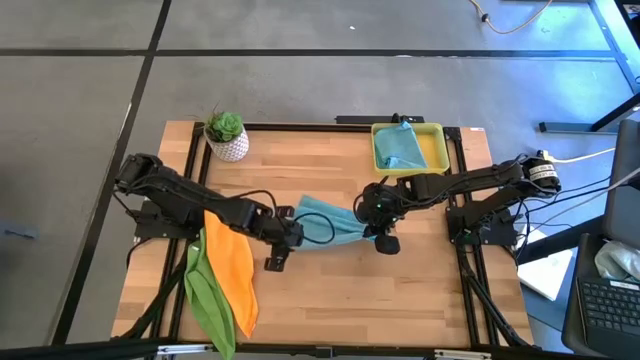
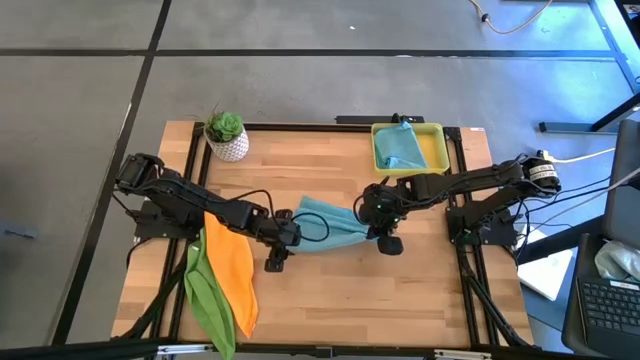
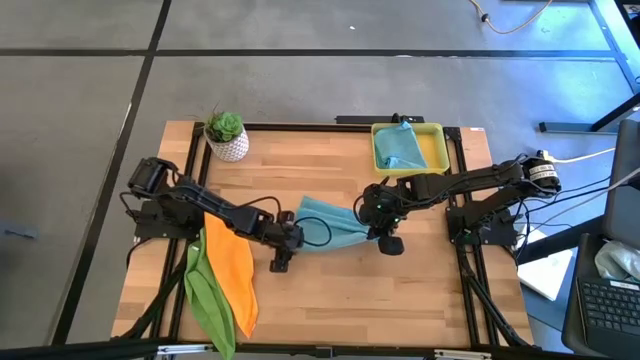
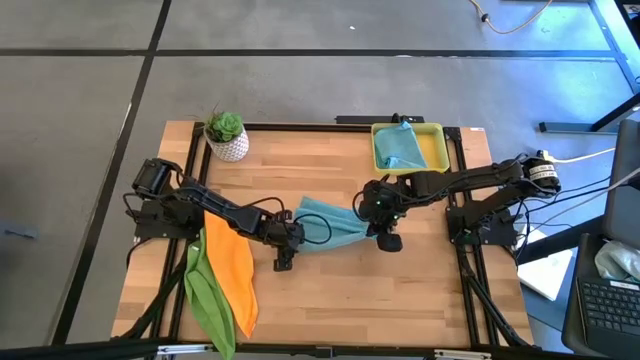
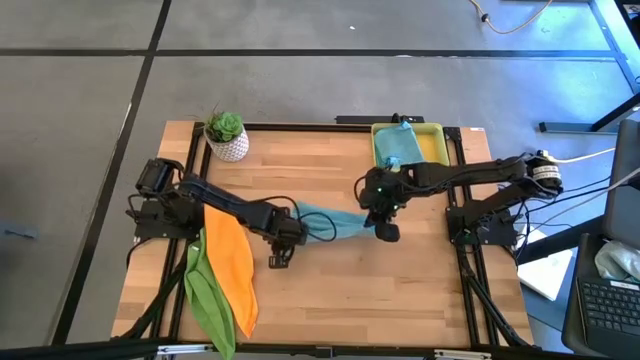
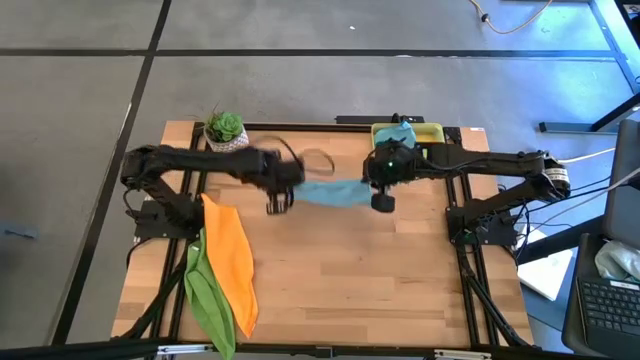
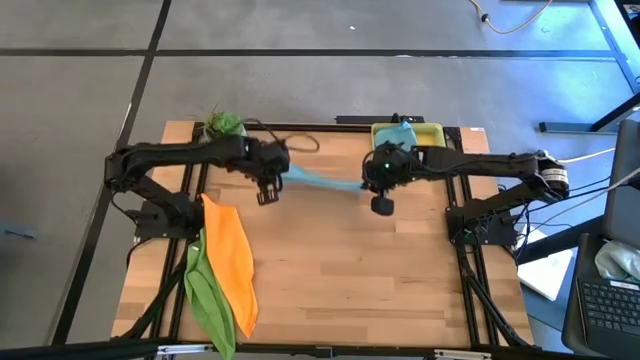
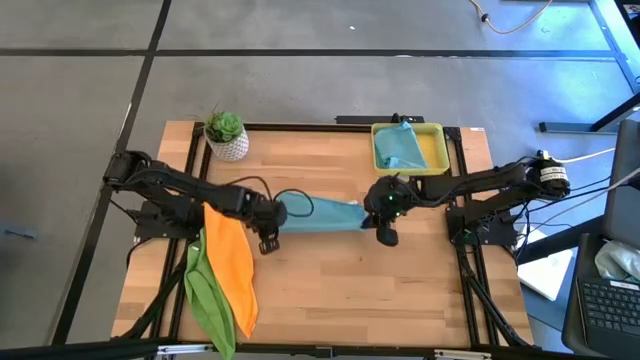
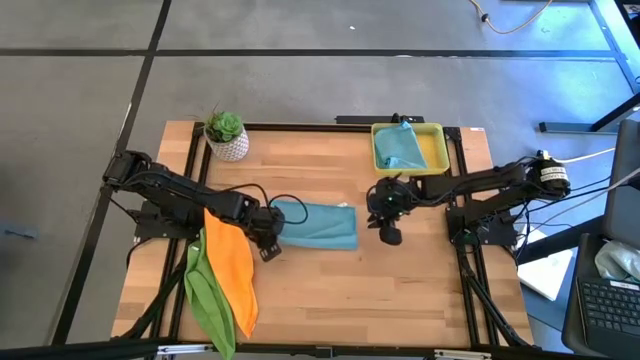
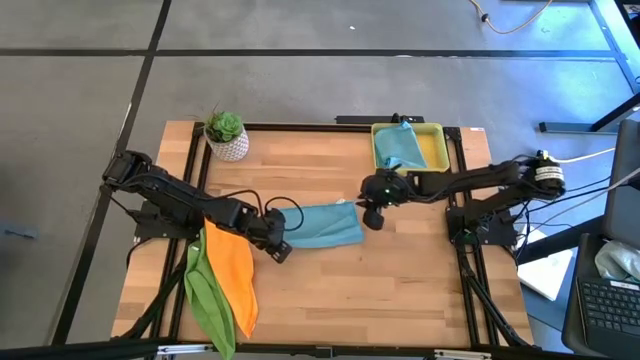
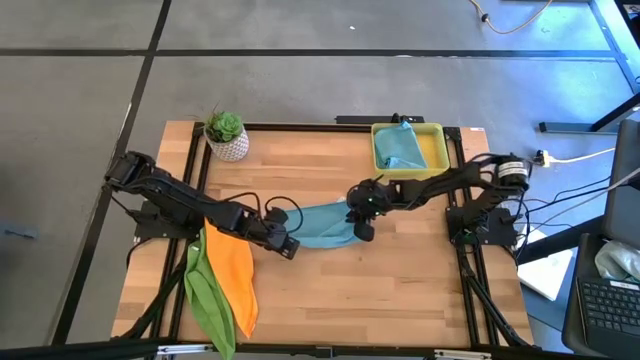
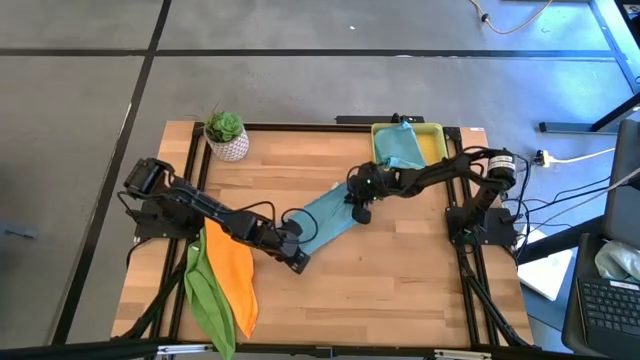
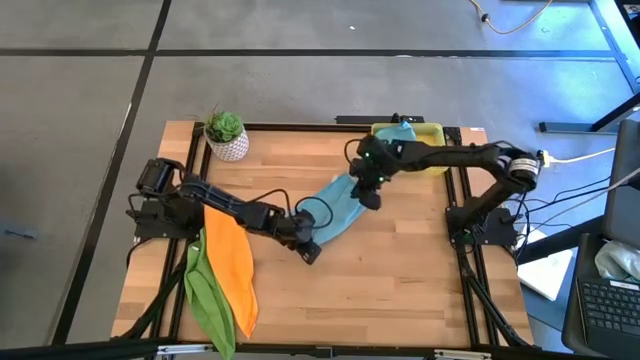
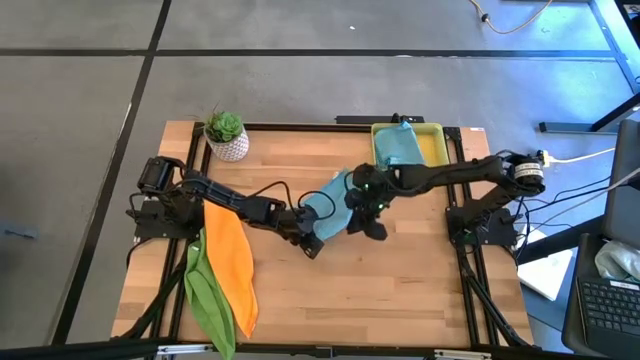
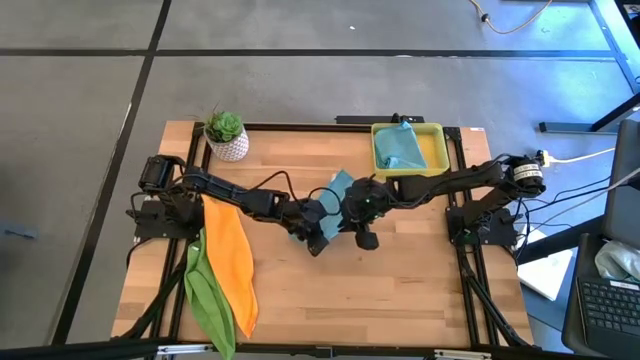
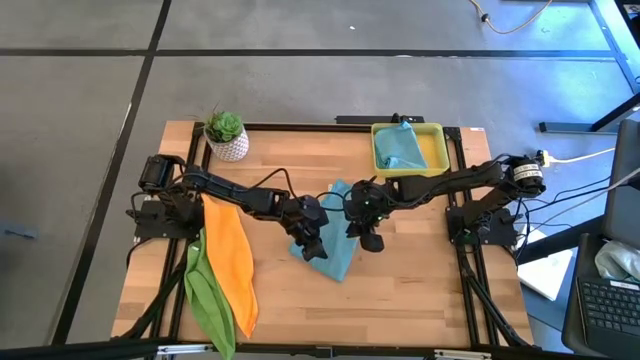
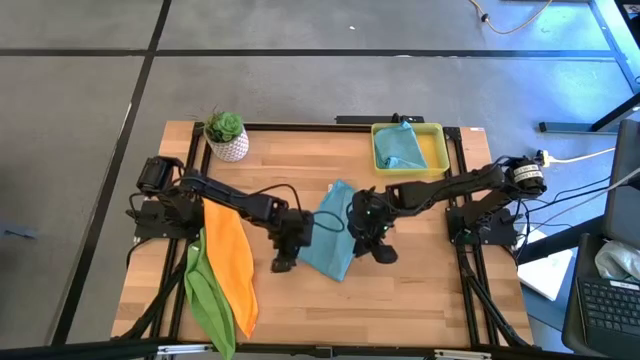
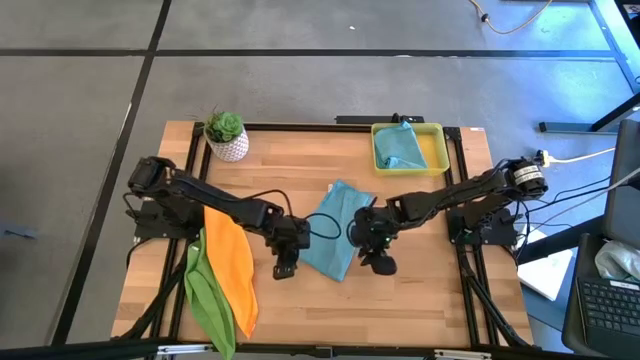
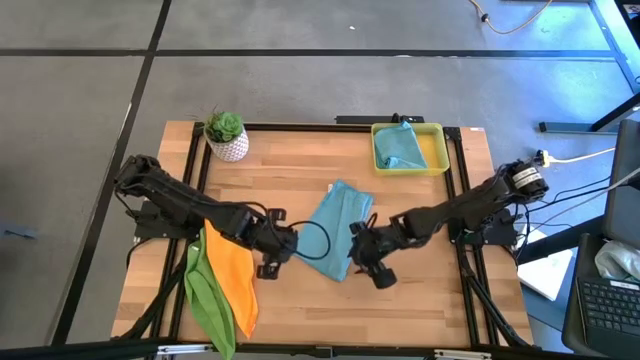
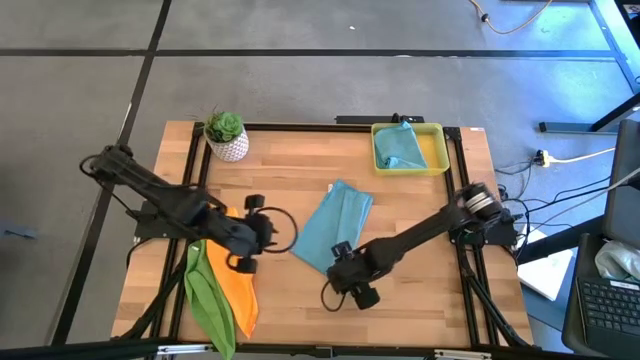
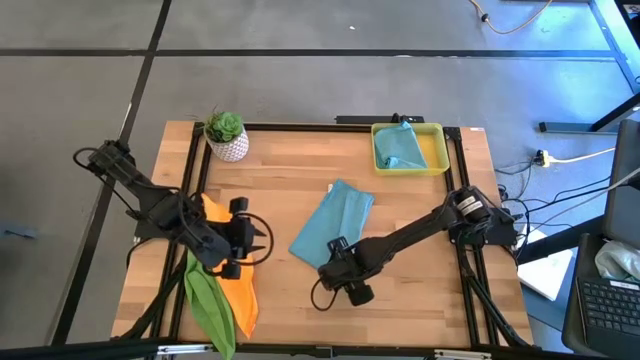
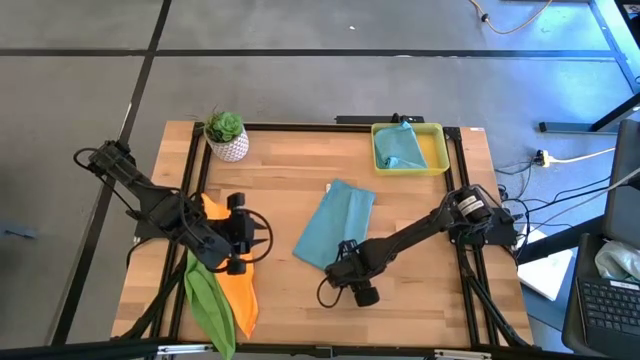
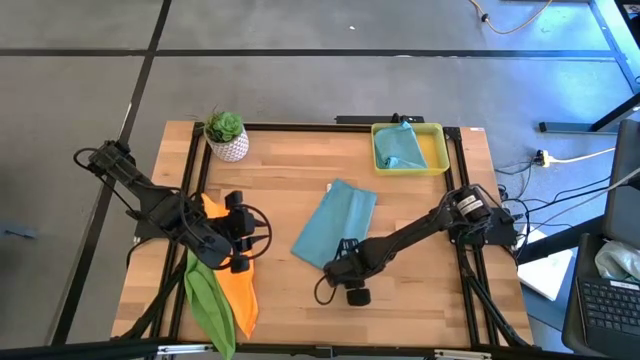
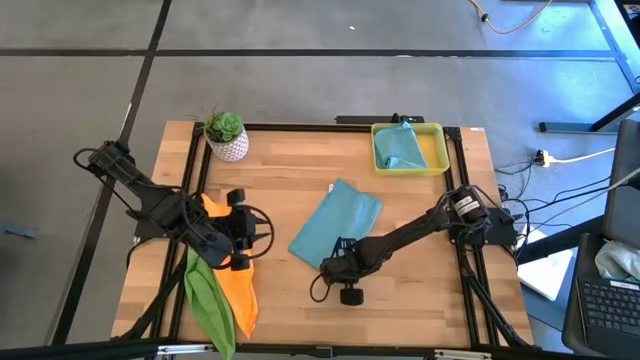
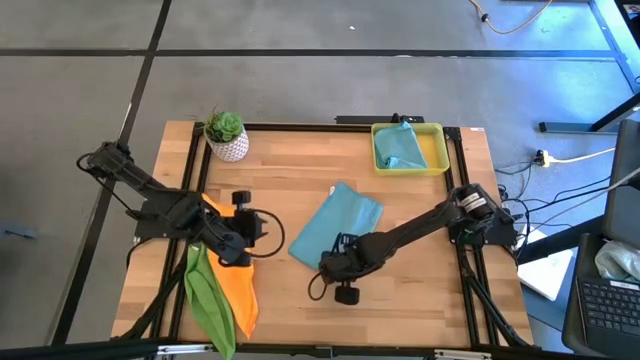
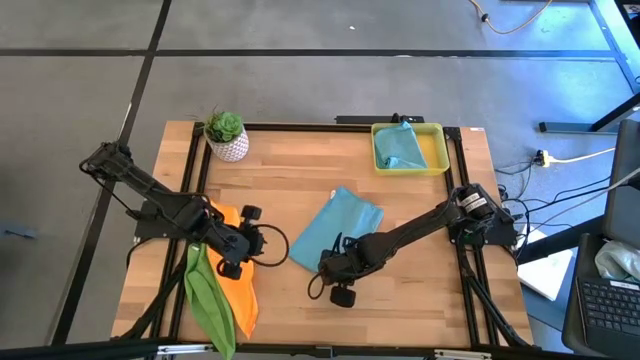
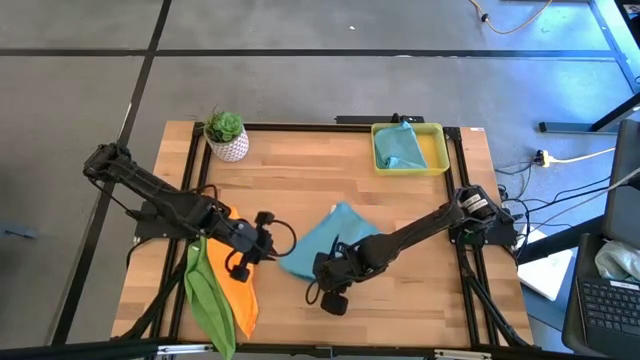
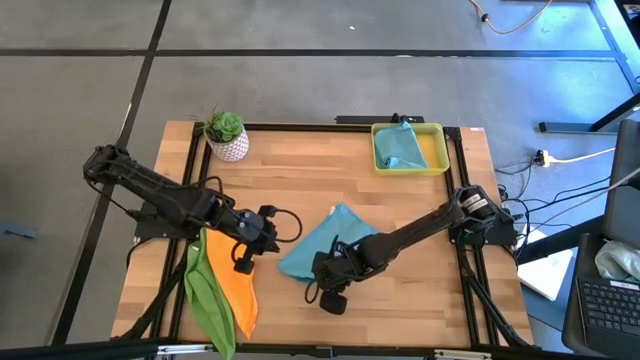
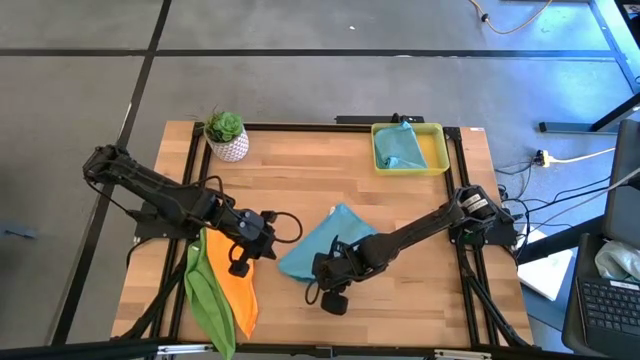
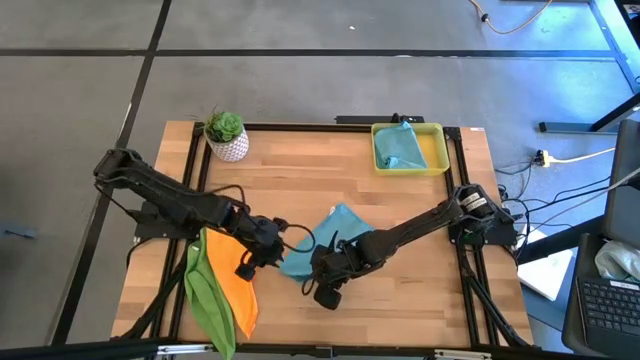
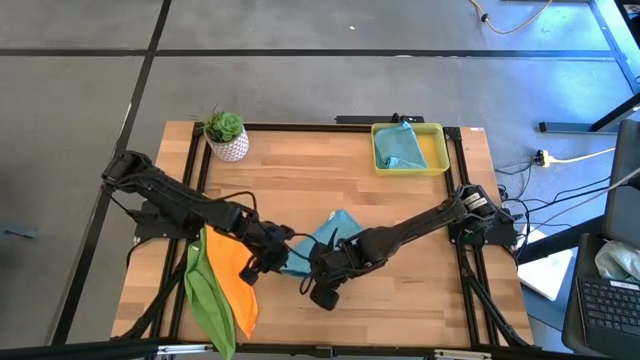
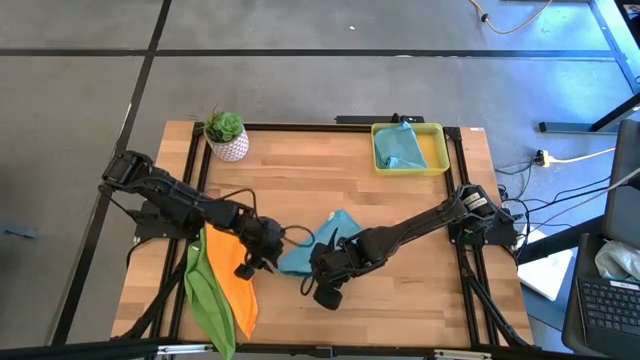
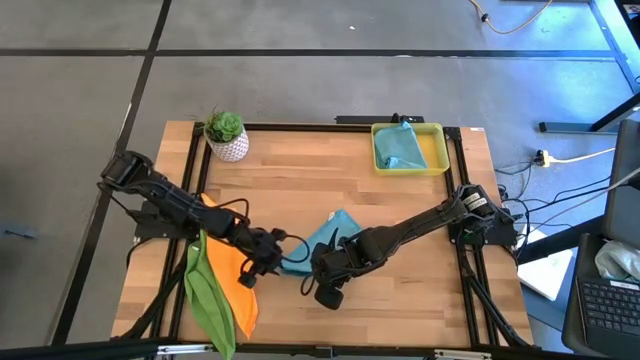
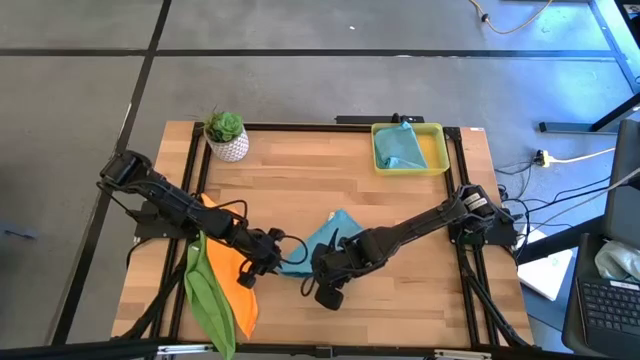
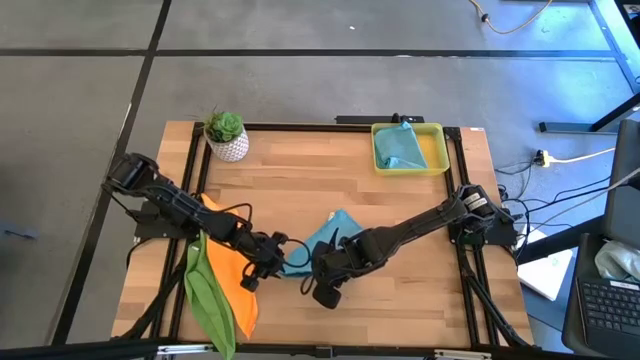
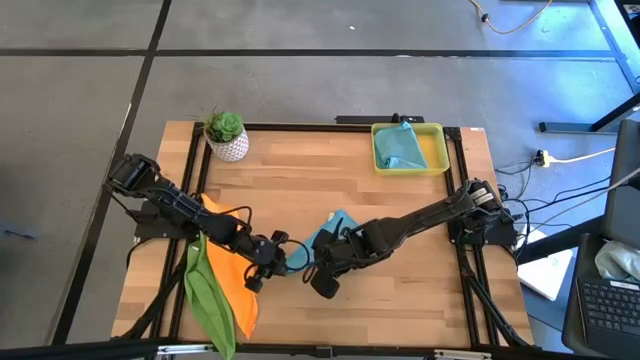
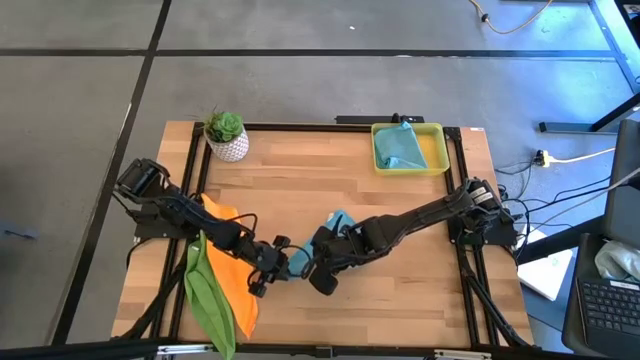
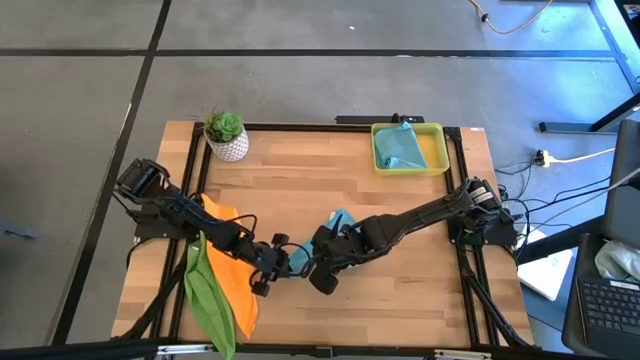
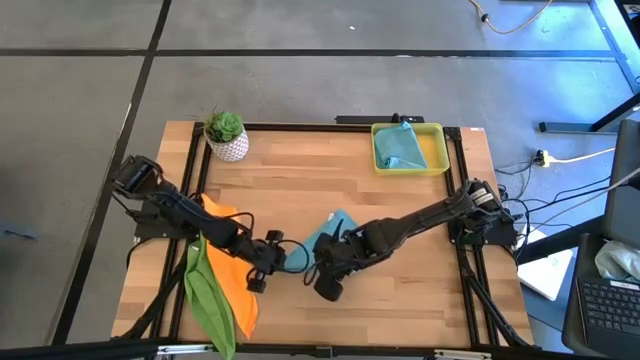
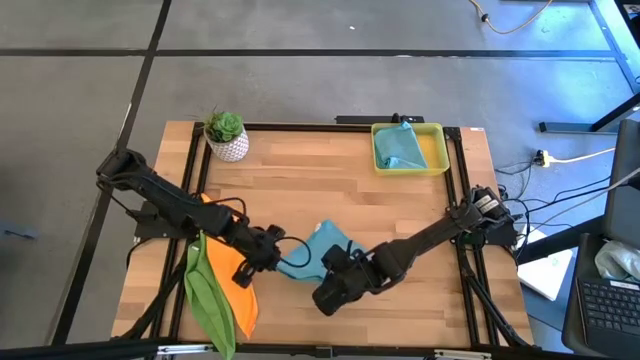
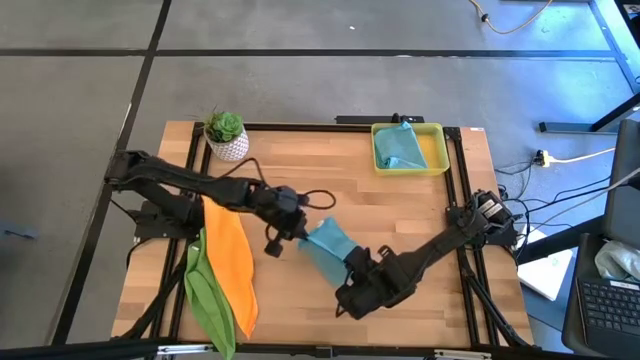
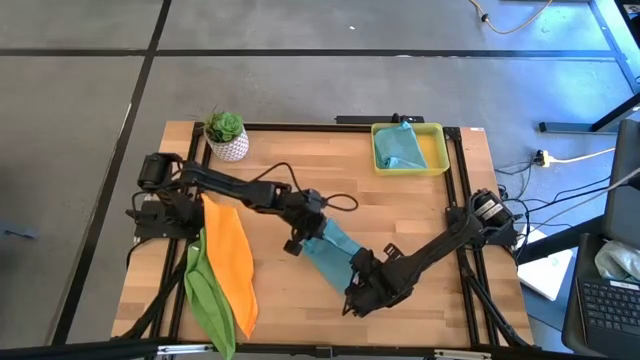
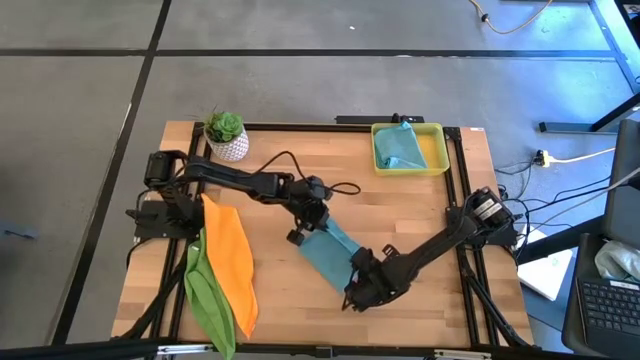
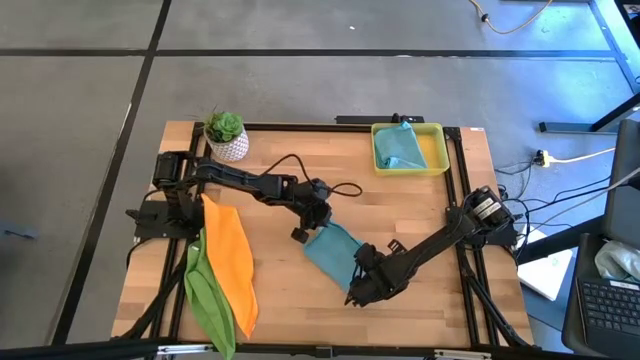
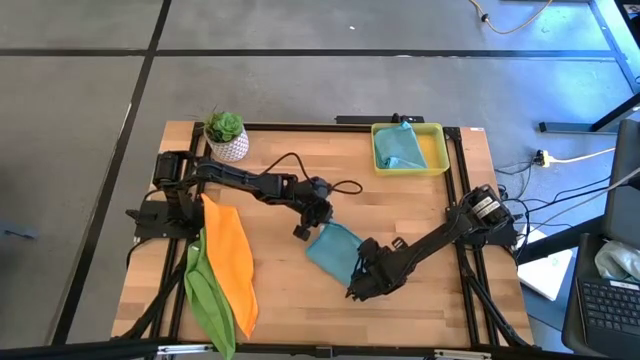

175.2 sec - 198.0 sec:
Task: Fold microfiber towels
Fold the right blue microfiber towel
